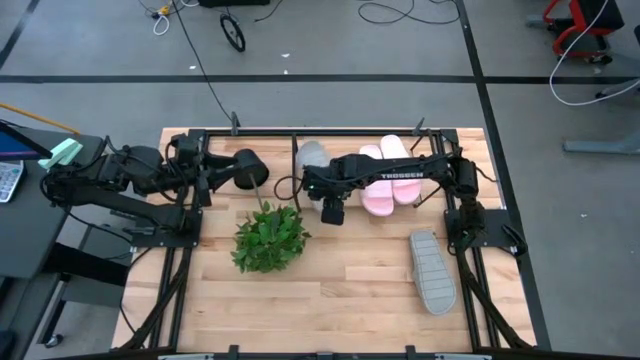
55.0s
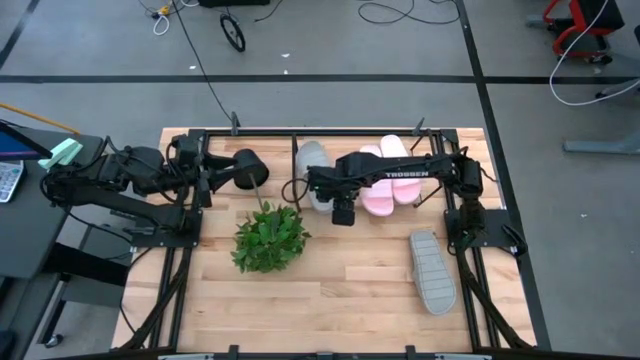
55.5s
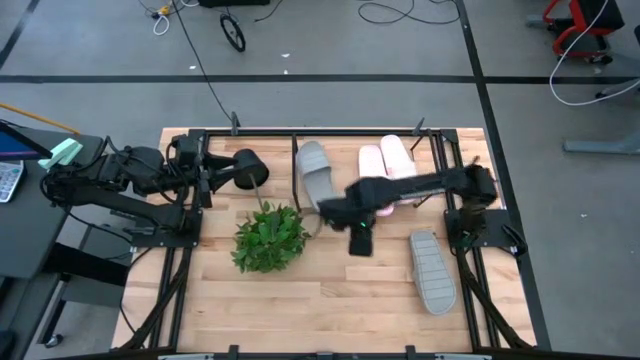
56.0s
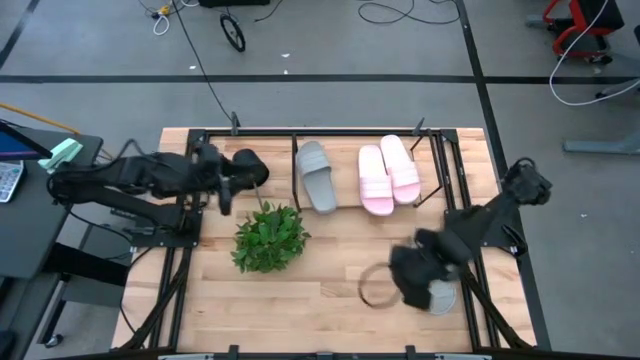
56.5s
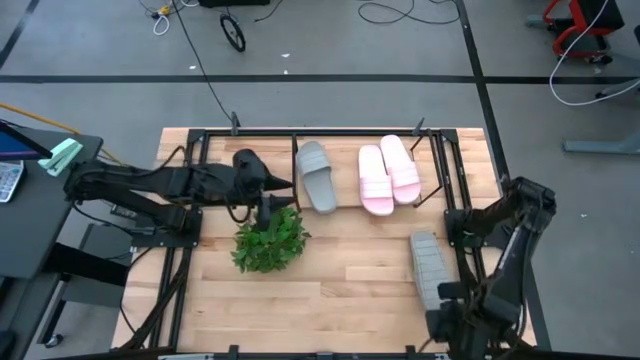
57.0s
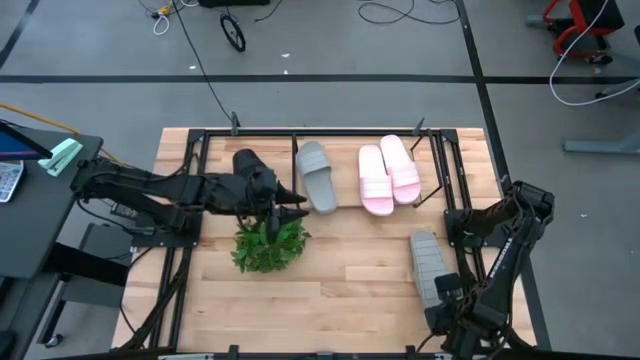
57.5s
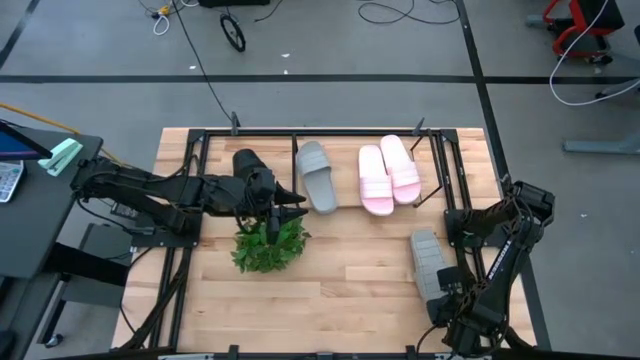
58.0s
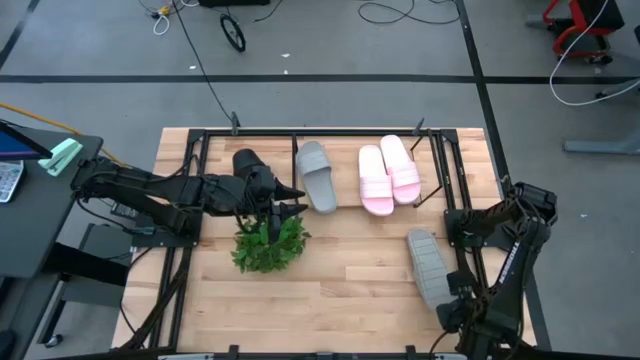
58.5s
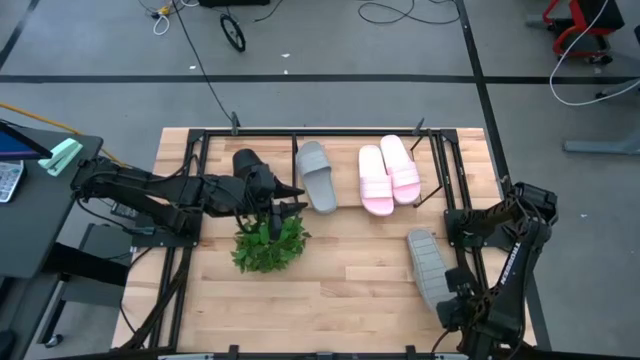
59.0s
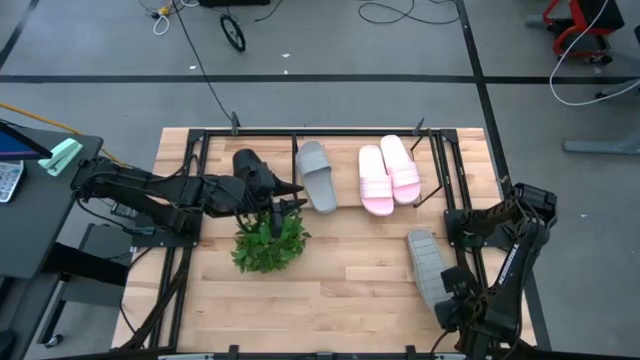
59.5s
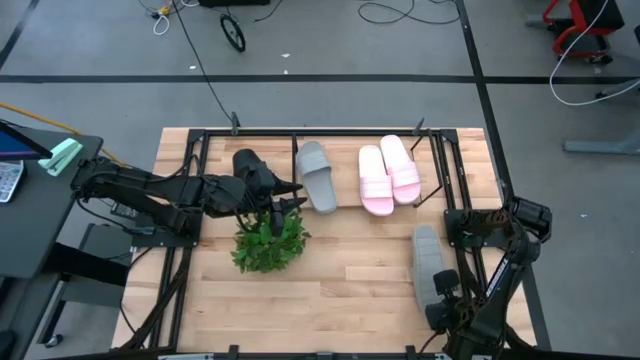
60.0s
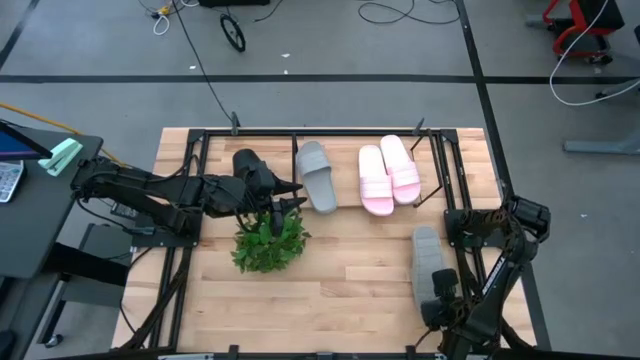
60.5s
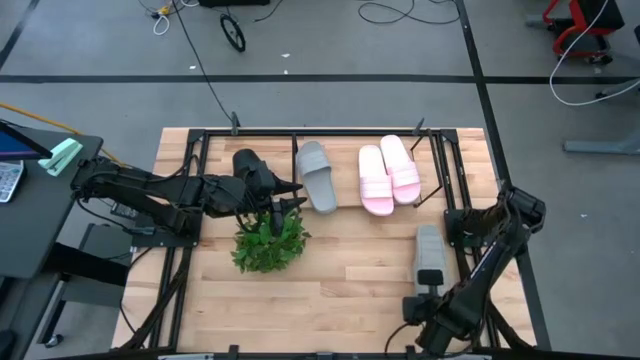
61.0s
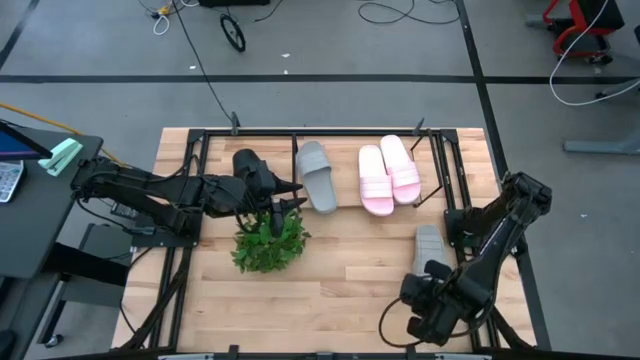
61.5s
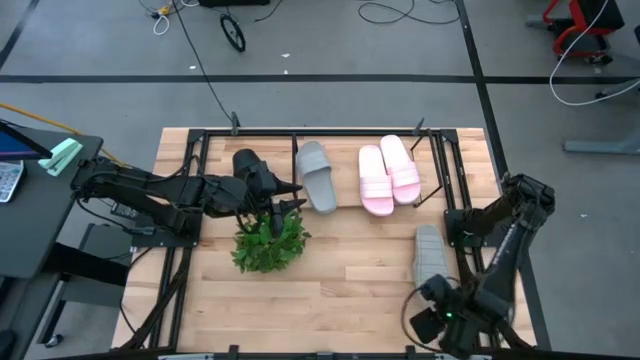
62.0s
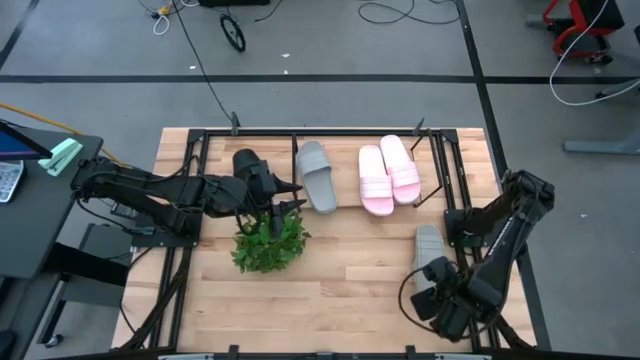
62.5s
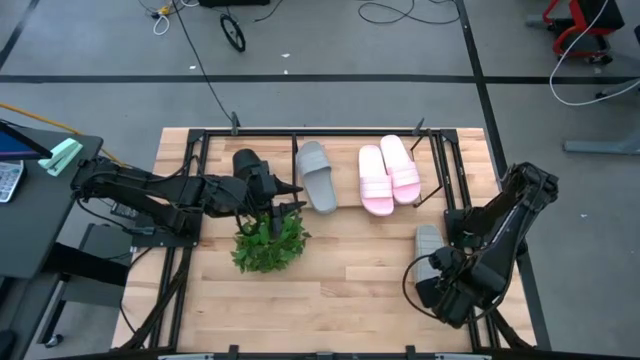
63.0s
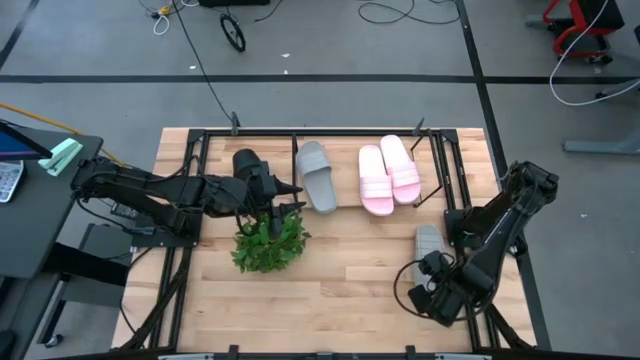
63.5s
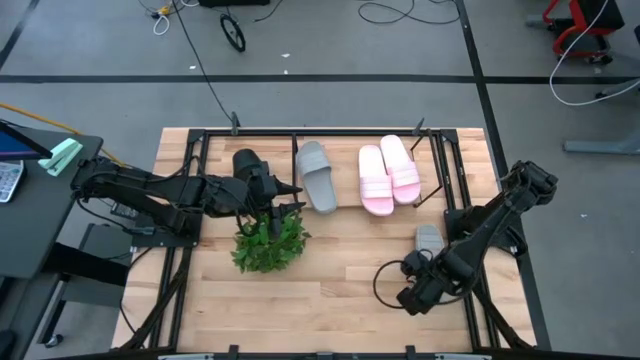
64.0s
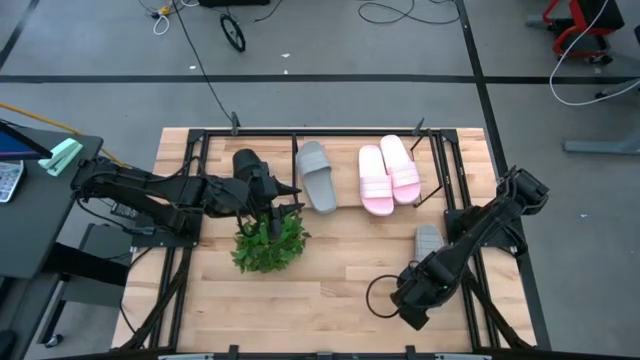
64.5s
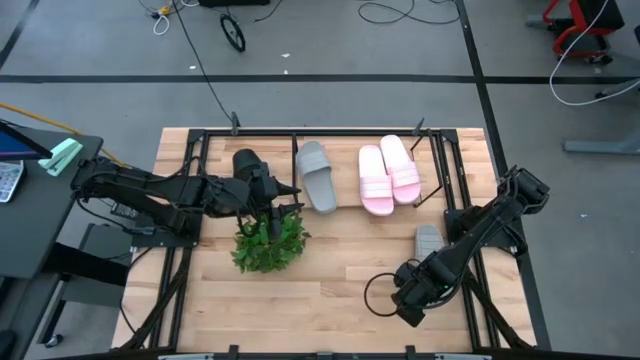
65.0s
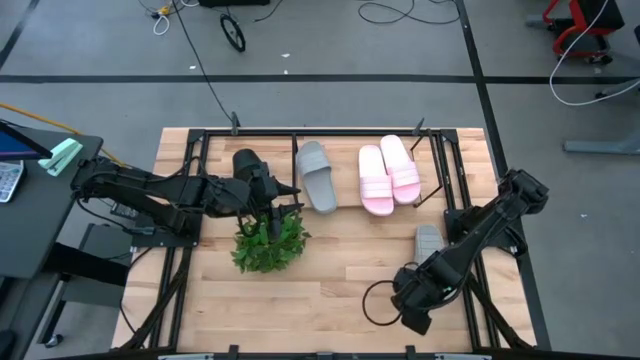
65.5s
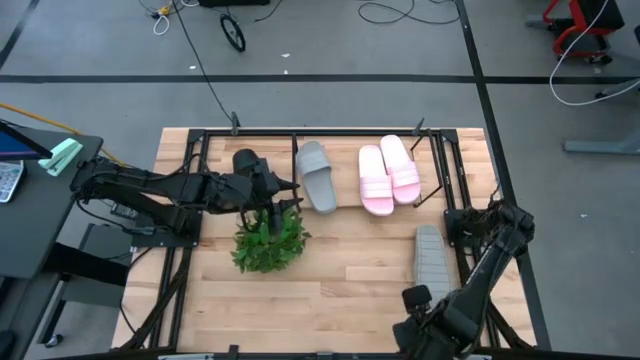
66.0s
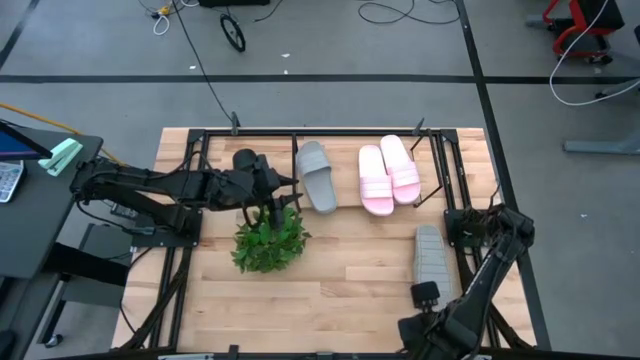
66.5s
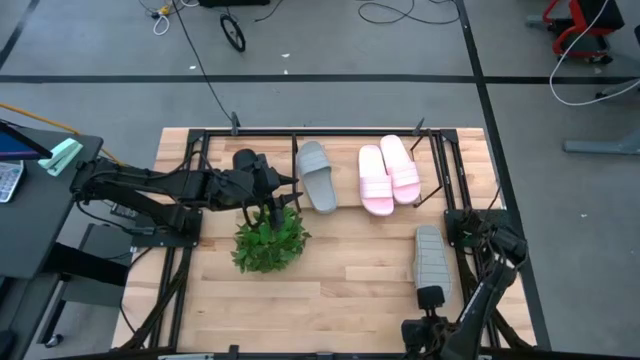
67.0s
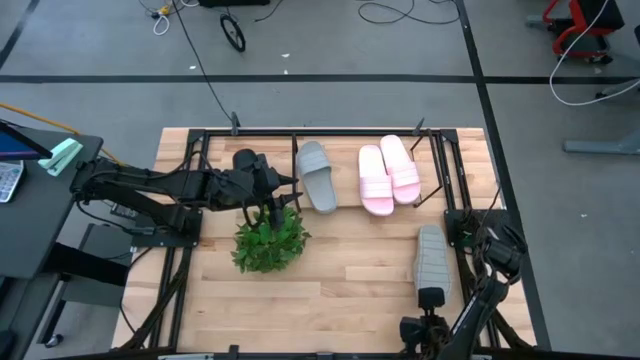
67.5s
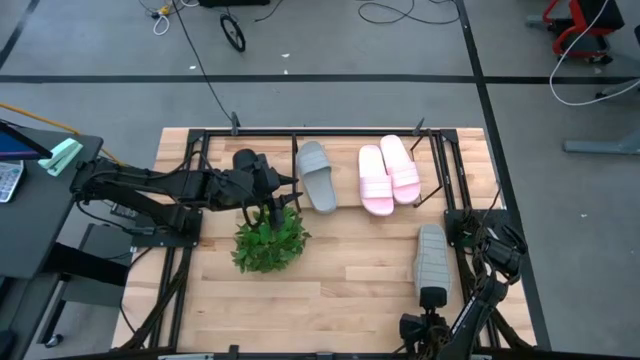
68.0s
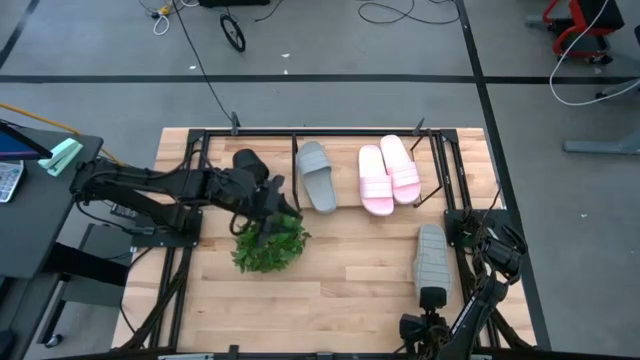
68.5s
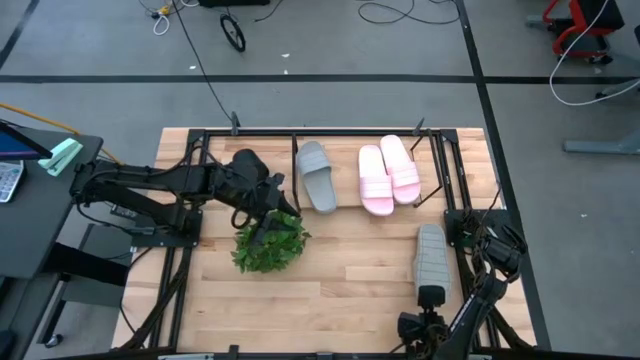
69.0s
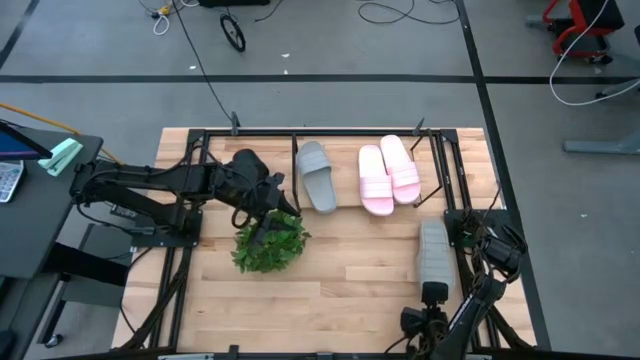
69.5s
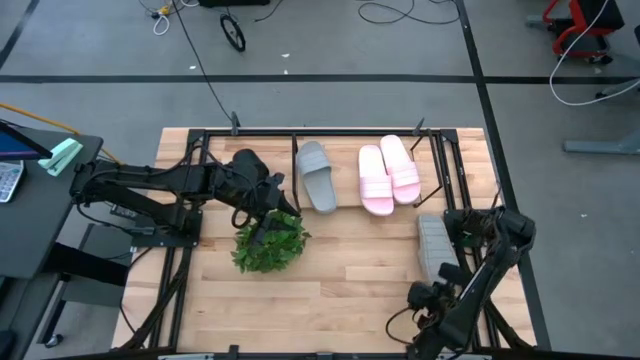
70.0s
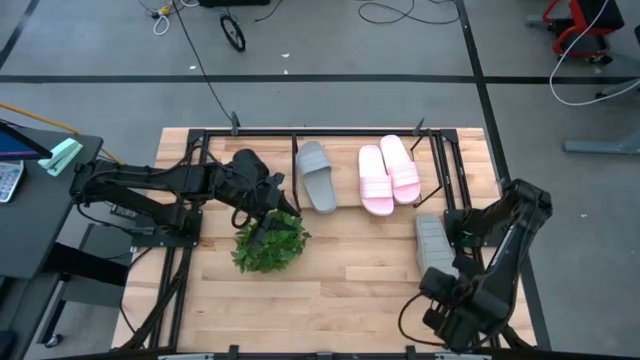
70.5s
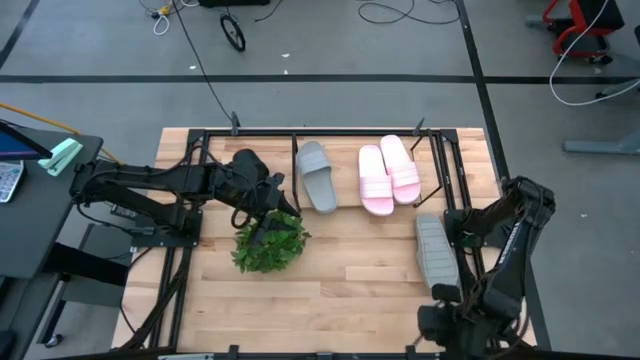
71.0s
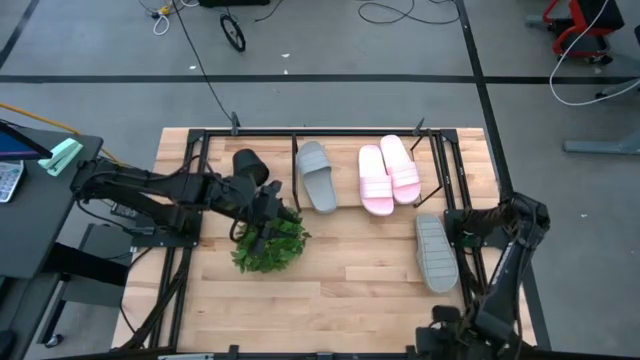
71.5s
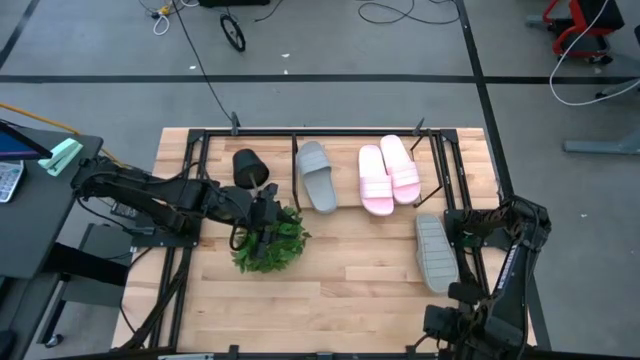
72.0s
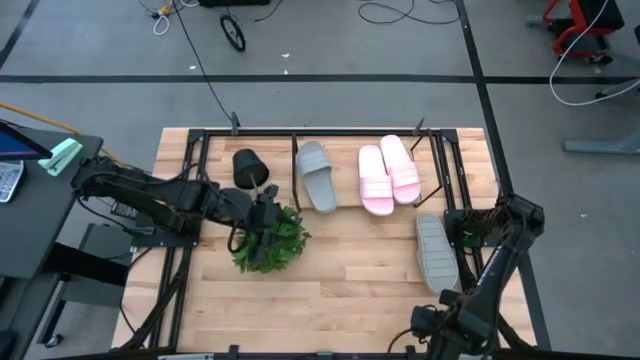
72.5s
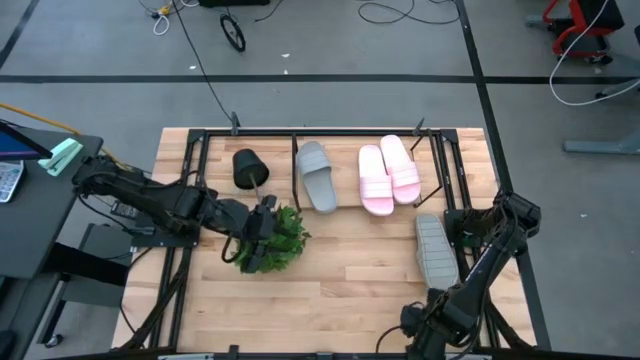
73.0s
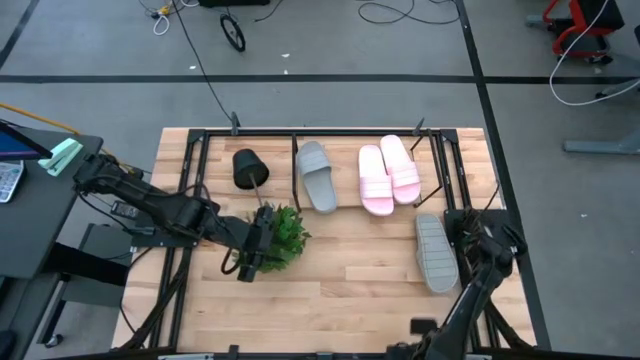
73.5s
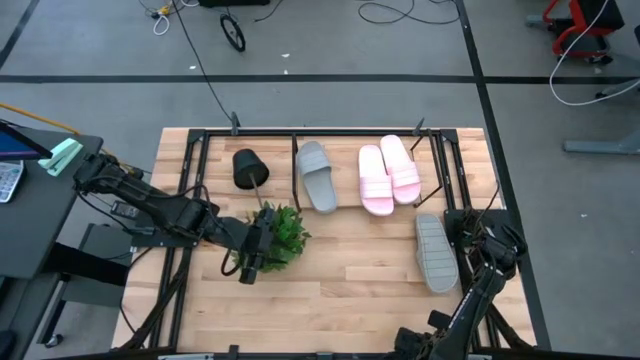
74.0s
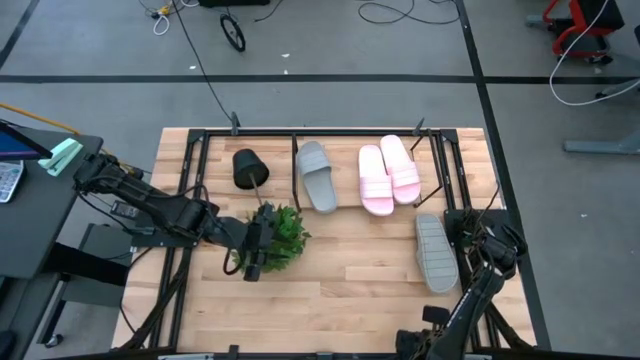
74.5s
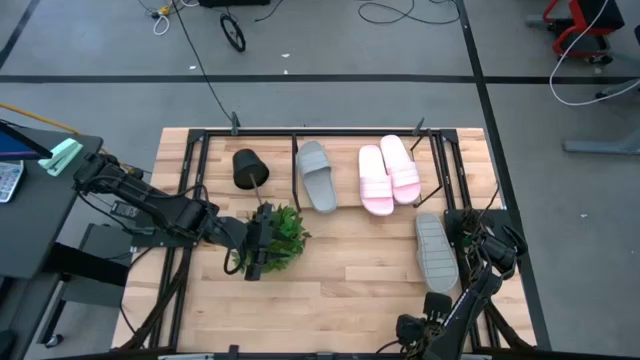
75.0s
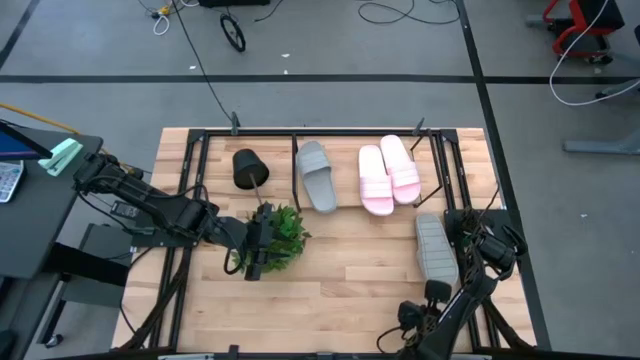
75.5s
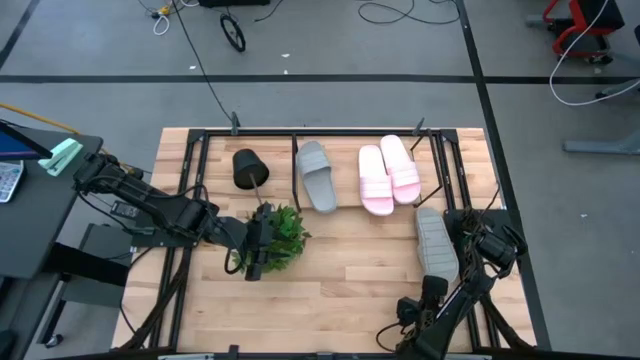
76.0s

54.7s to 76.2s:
Task: Pick and place slides into the shelf
Put the gray slide on the shelf
